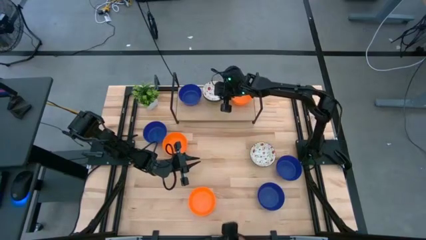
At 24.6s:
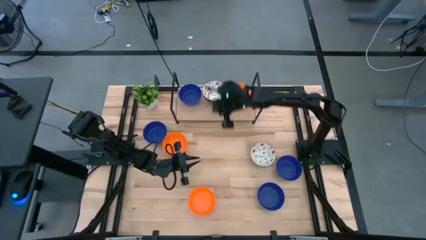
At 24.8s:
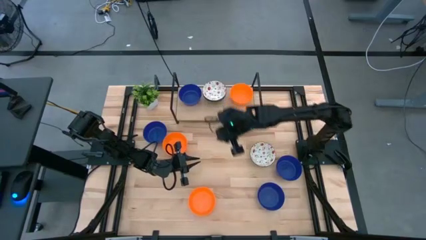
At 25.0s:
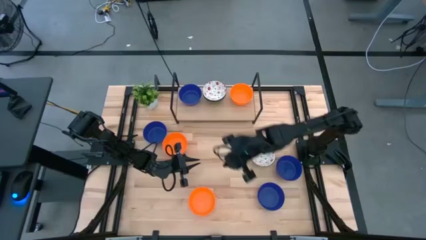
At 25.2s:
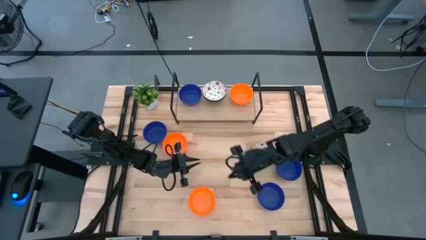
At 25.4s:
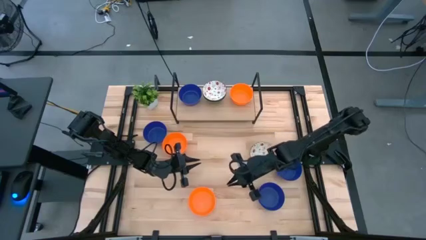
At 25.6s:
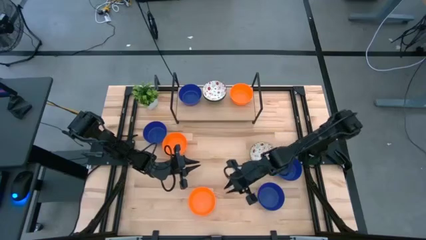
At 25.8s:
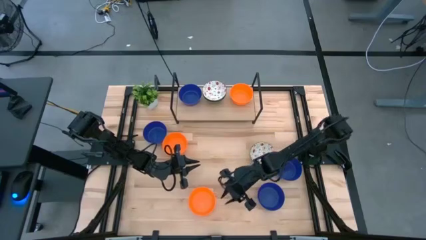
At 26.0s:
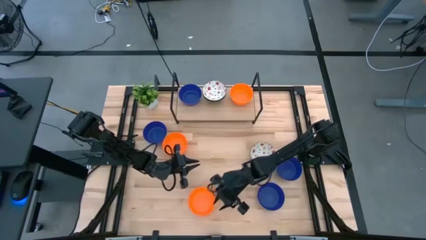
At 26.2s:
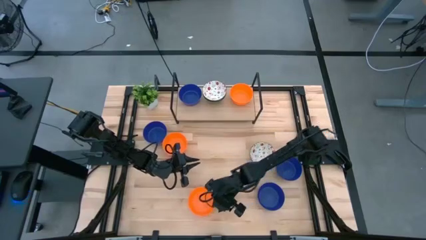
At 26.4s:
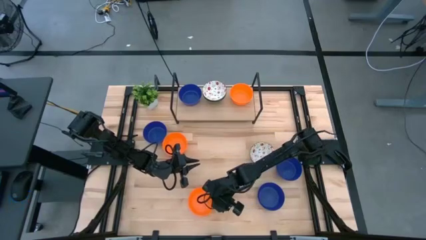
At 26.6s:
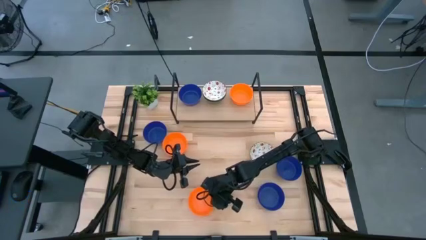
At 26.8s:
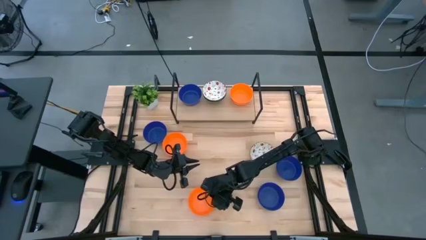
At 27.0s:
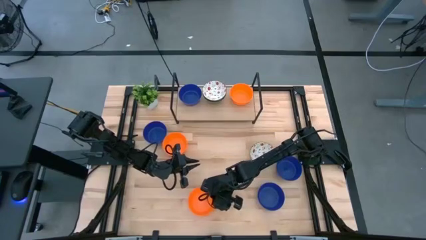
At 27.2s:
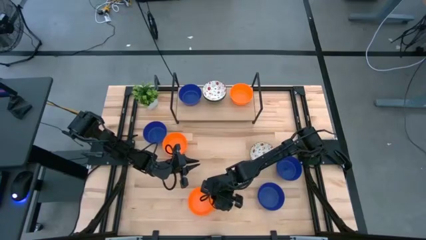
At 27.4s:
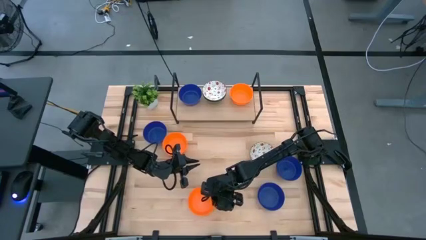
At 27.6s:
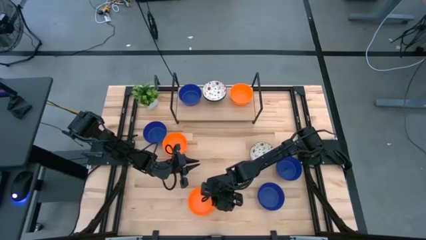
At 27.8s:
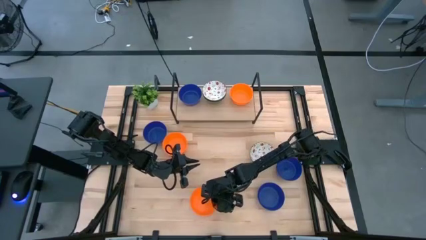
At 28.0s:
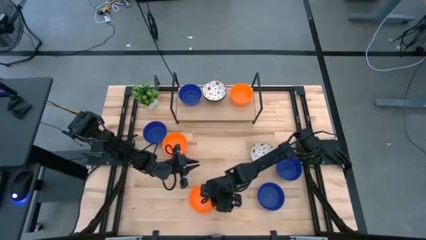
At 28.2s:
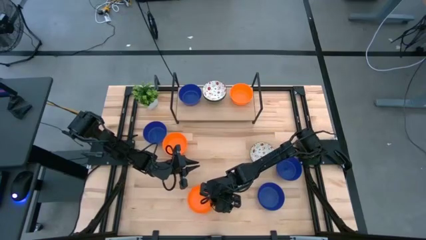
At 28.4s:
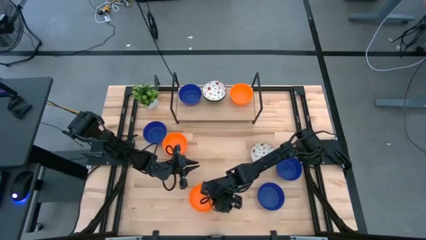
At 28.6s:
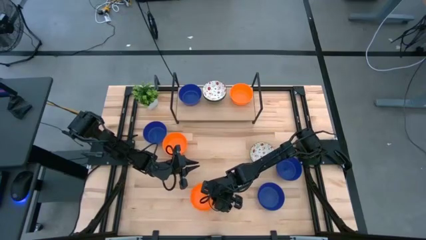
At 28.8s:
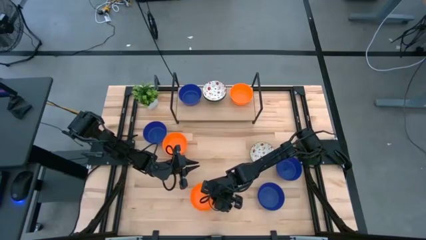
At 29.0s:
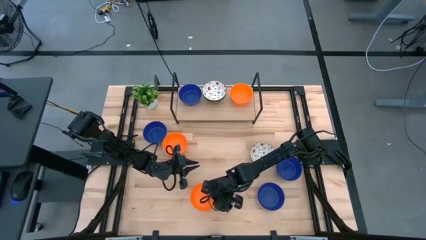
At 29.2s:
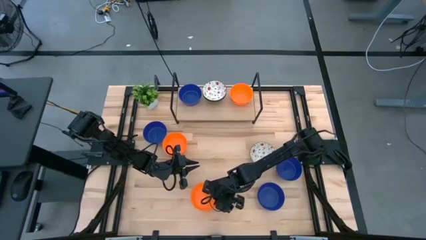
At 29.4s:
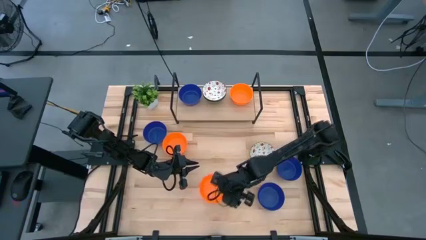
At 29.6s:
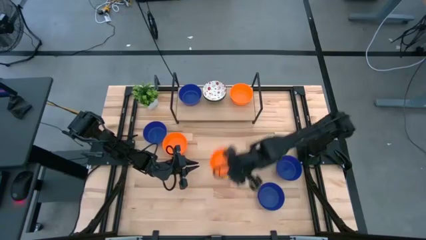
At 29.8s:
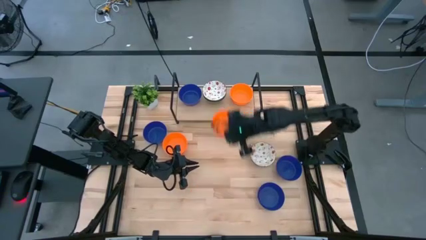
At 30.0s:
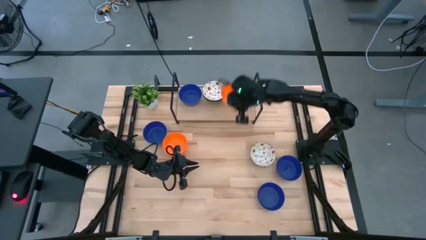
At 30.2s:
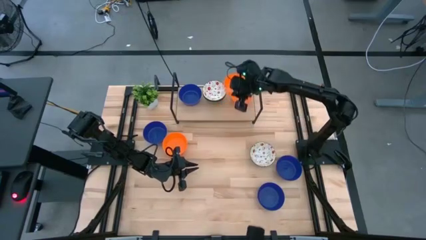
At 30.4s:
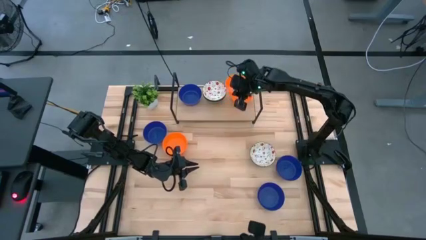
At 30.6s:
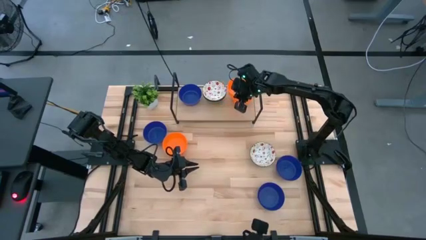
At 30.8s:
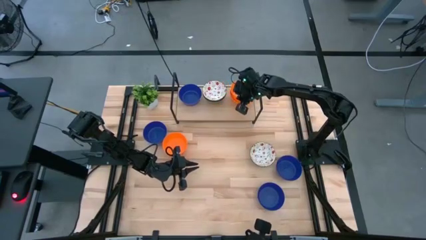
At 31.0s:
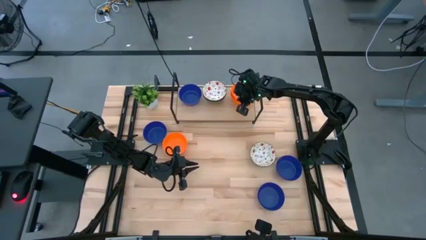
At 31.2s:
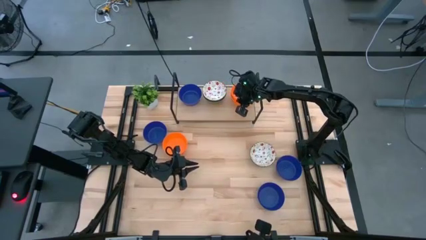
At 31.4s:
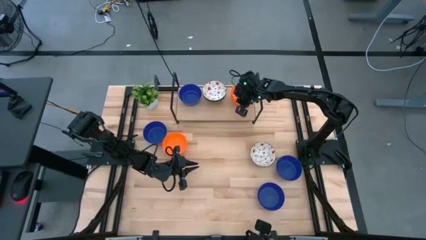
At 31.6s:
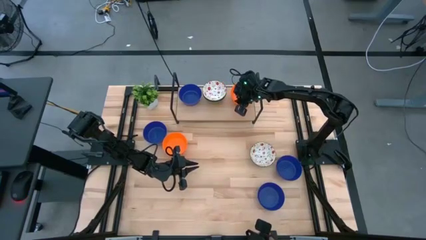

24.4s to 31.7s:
Task: Pick & Place Mini bowls
Stack the orange bowl on top of the orange bowl on the shelf

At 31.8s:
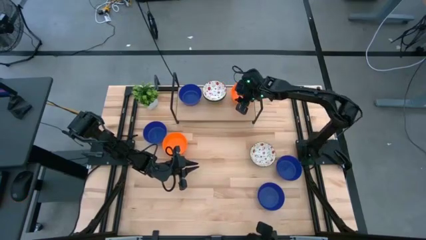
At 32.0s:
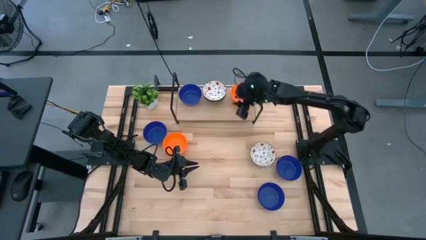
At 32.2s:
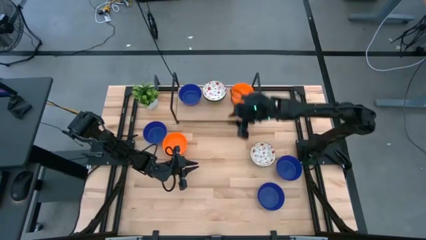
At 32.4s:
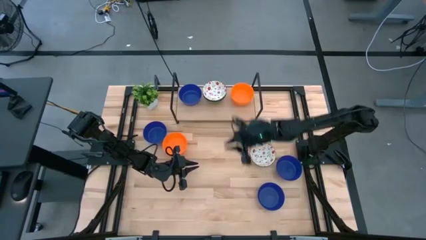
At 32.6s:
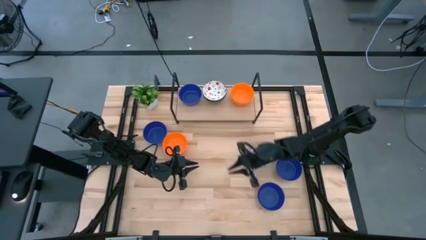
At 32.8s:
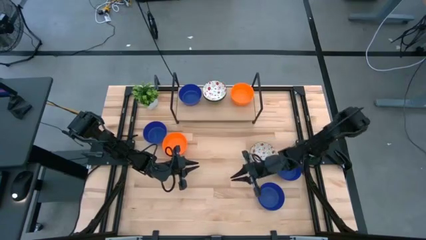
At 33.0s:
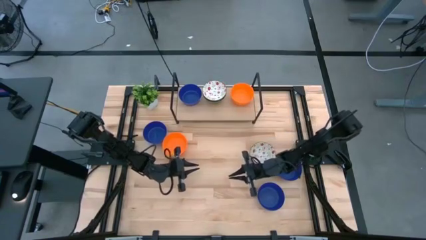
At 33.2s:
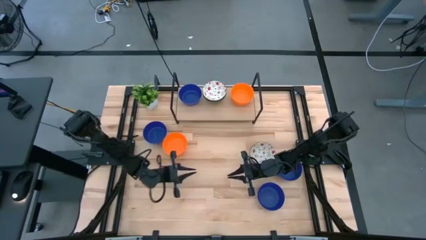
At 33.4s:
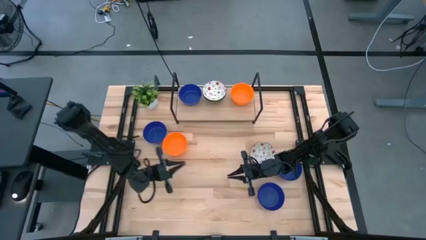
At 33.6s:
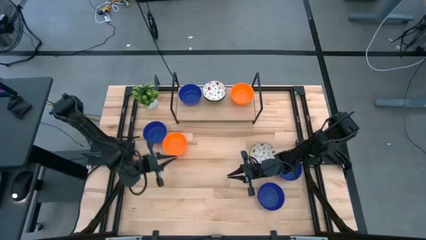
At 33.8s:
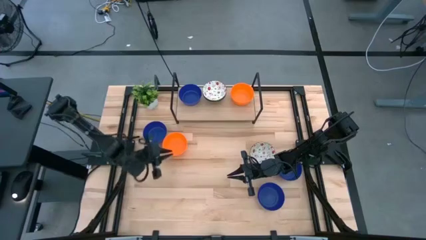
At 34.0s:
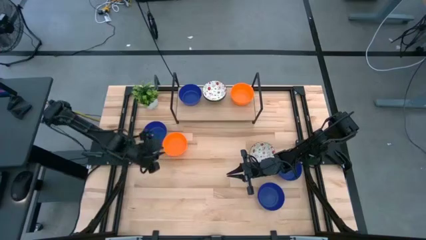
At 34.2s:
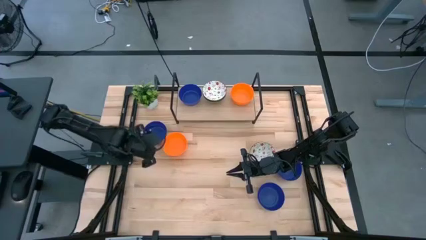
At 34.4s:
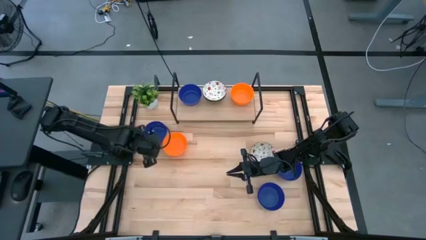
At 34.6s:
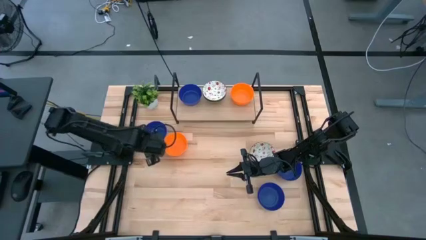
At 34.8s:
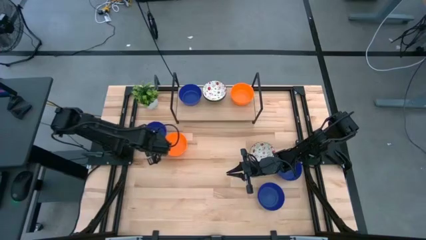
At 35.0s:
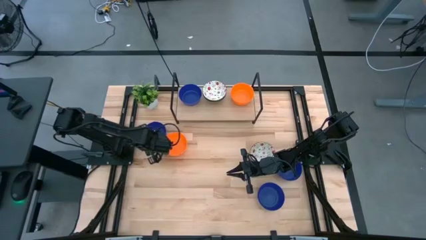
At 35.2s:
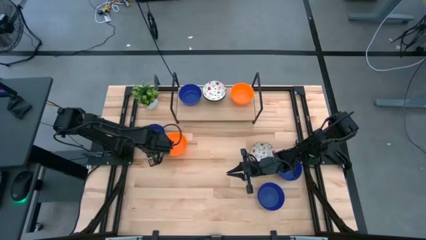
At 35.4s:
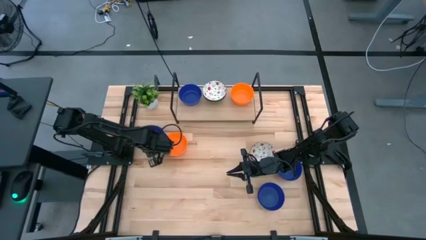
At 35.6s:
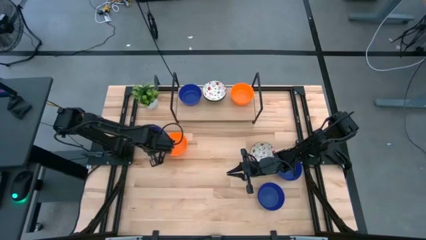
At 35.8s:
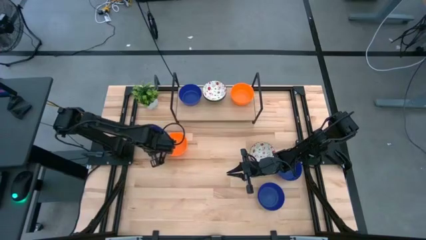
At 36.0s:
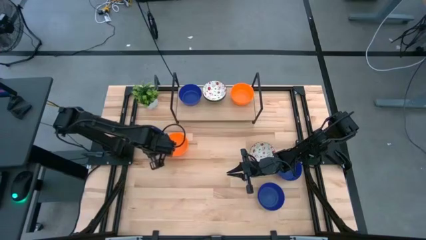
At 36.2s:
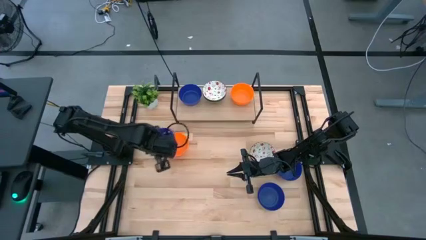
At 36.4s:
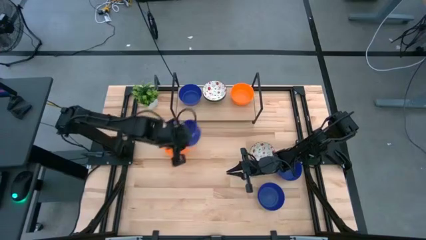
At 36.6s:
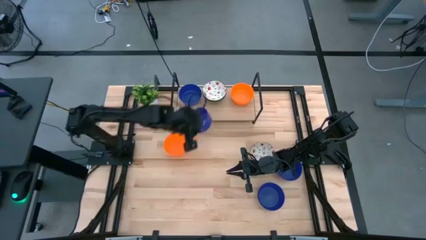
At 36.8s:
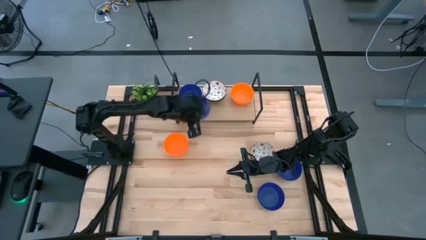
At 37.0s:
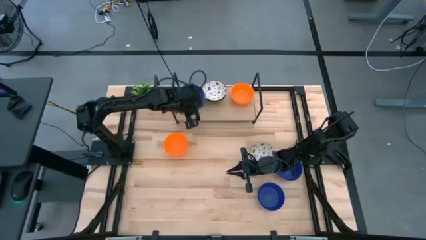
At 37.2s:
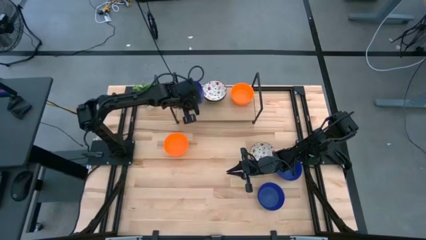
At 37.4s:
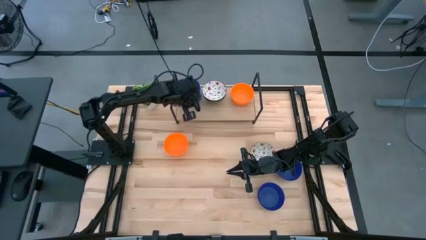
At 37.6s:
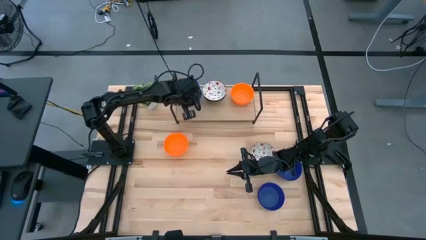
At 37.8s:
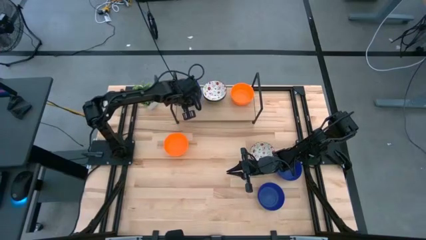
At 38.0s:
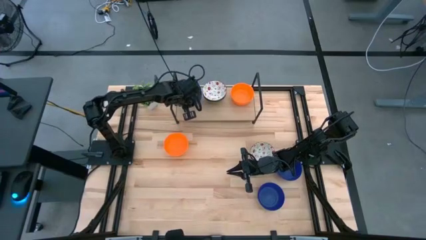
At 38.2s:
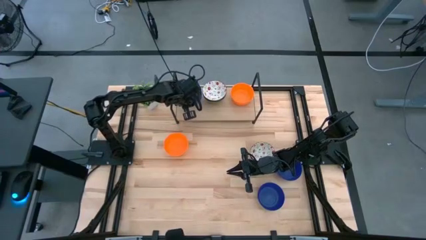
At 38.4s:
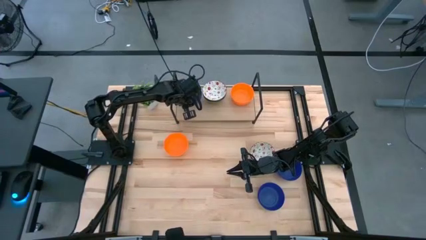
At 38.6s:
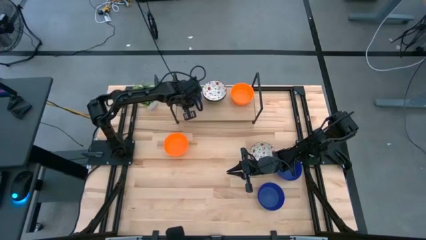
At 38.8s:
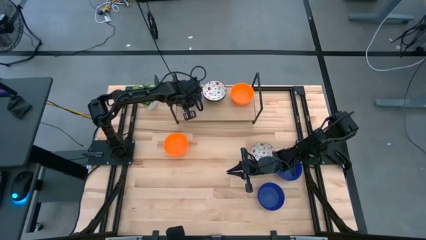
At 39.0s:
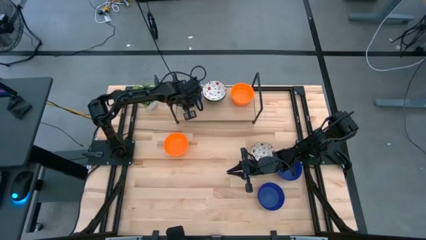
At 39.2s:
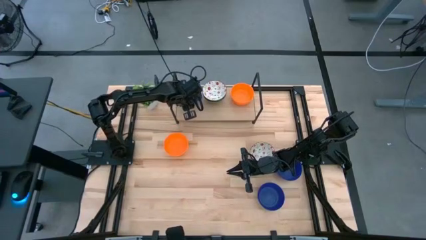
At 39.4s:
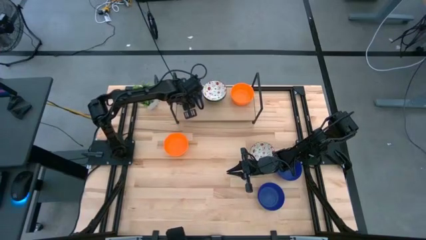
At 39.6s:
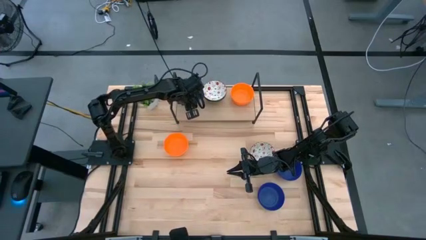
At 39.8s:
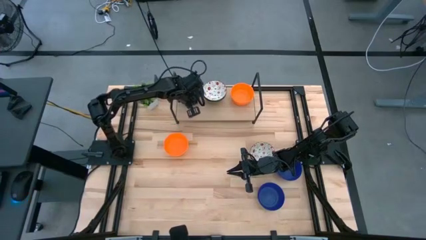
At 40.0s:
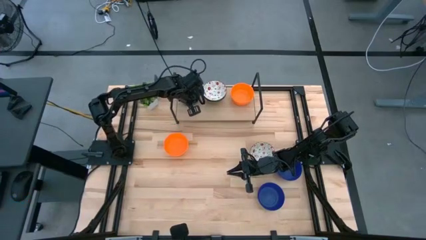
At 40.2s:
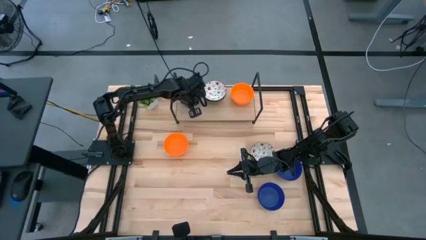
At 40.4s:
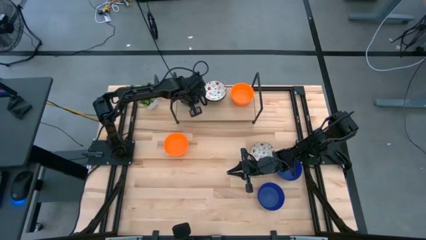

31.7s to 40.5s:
Stack the blue bowl on top of the blue bowl on the shelf
